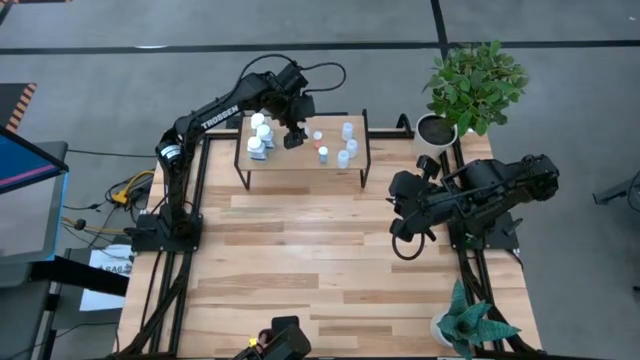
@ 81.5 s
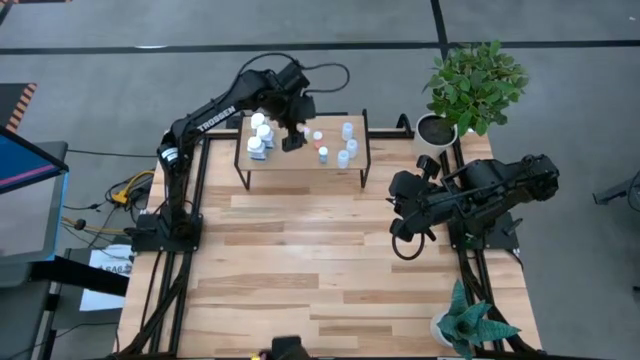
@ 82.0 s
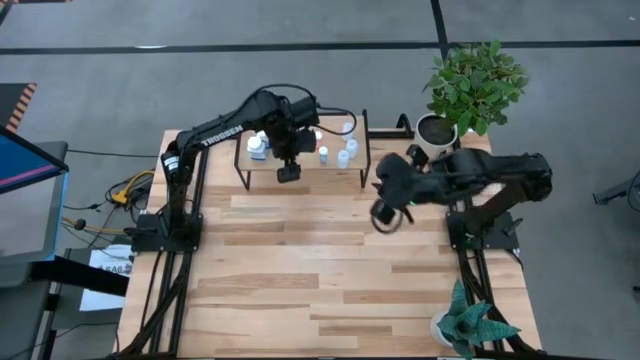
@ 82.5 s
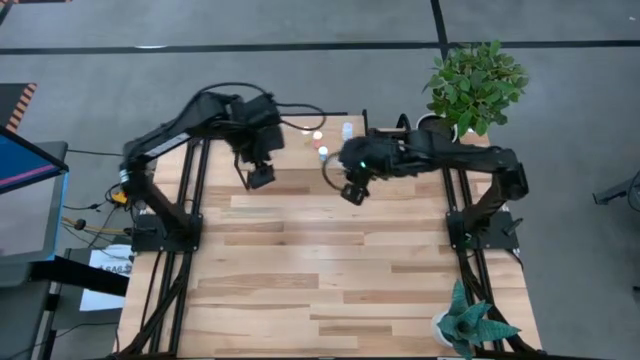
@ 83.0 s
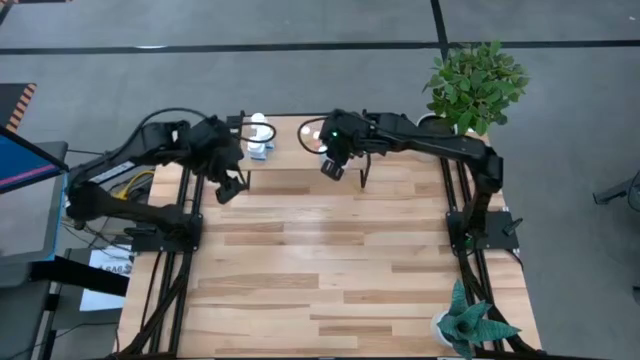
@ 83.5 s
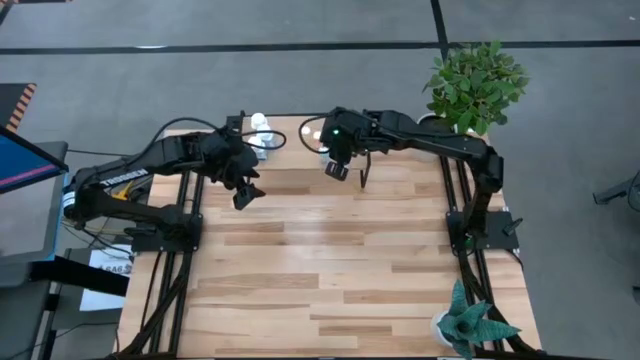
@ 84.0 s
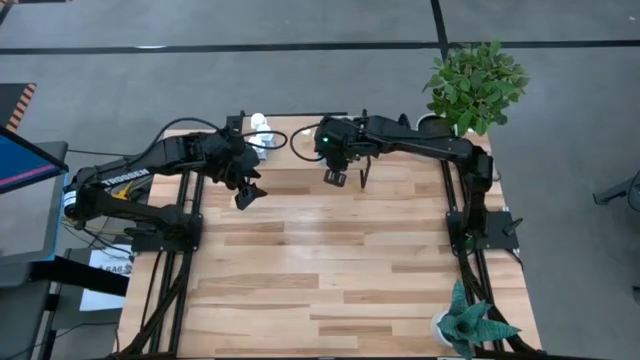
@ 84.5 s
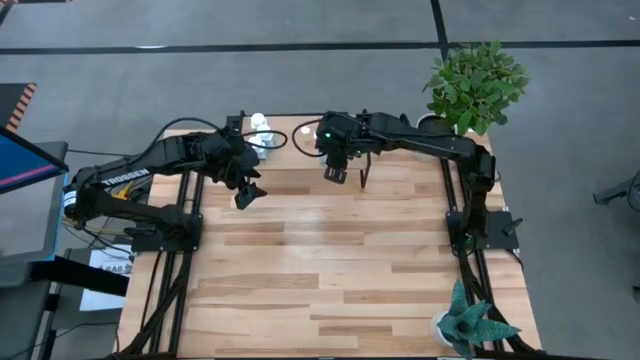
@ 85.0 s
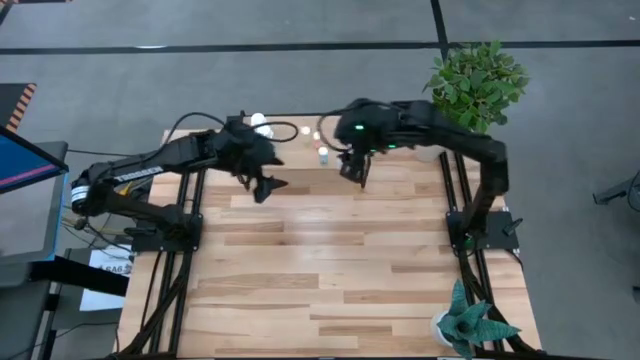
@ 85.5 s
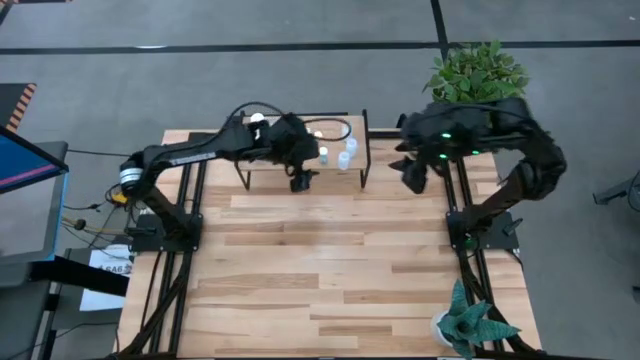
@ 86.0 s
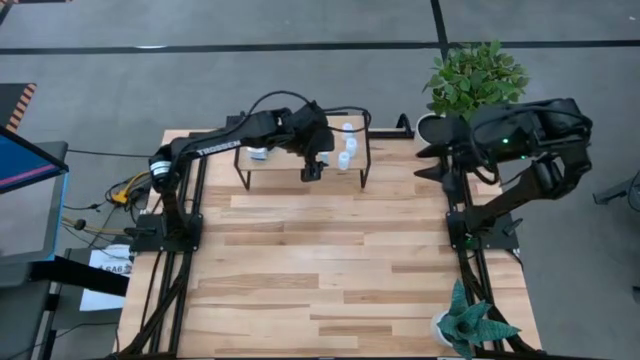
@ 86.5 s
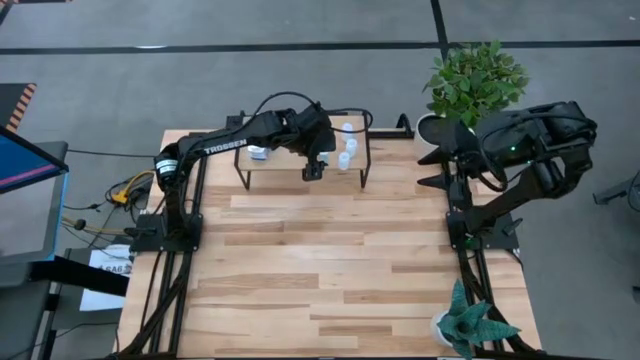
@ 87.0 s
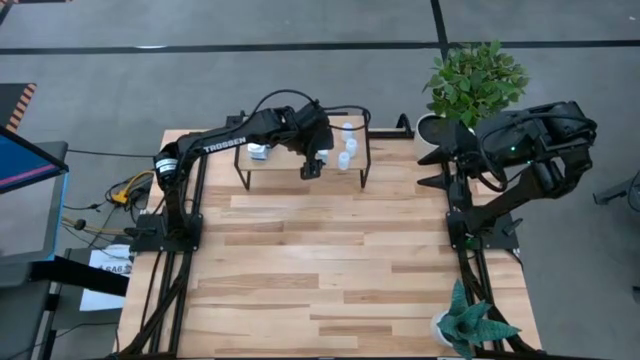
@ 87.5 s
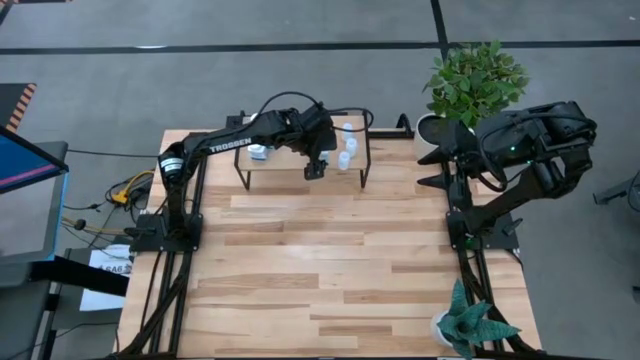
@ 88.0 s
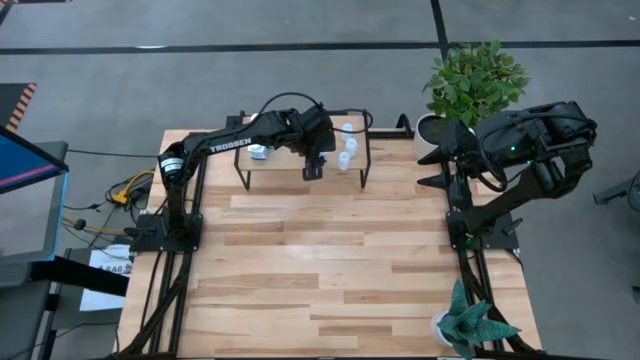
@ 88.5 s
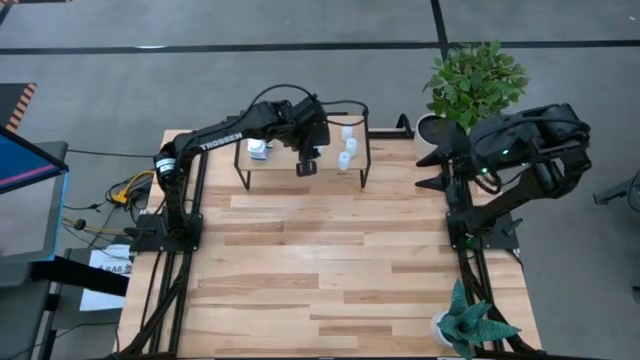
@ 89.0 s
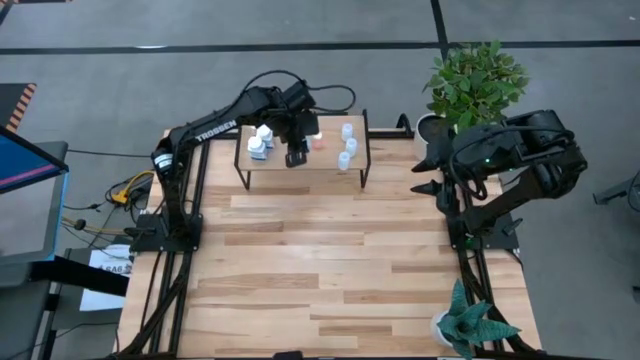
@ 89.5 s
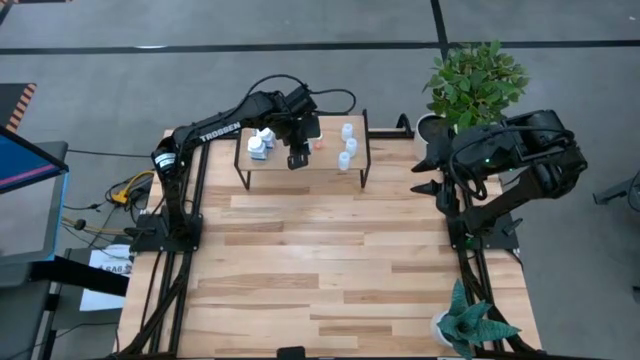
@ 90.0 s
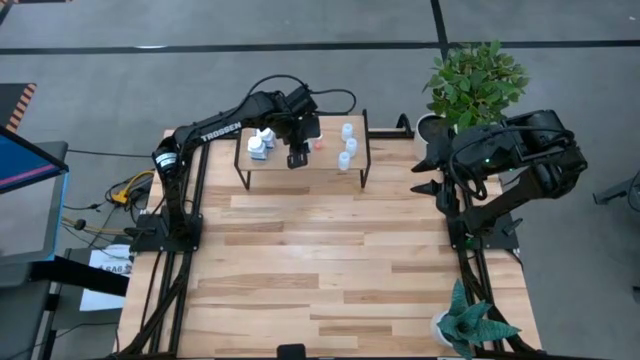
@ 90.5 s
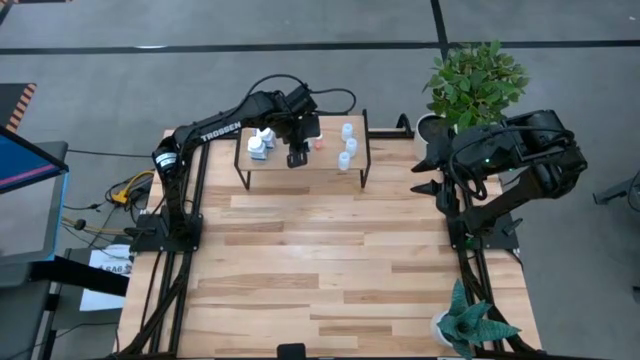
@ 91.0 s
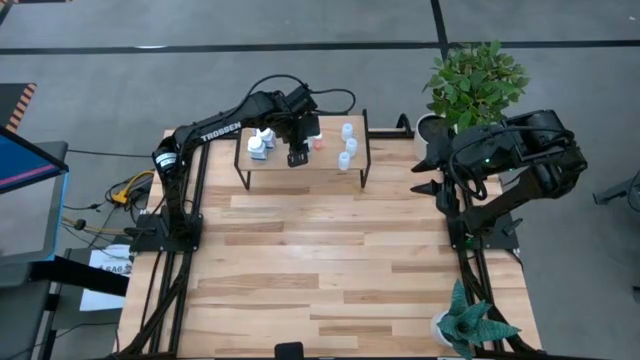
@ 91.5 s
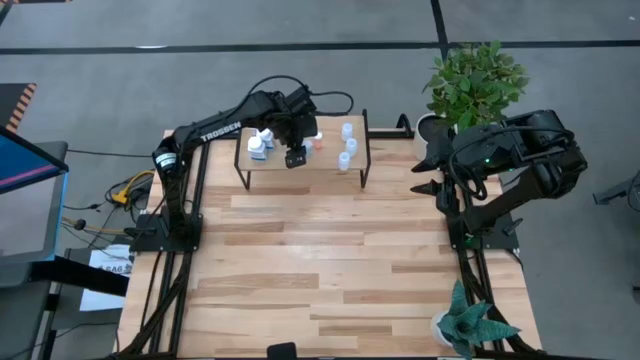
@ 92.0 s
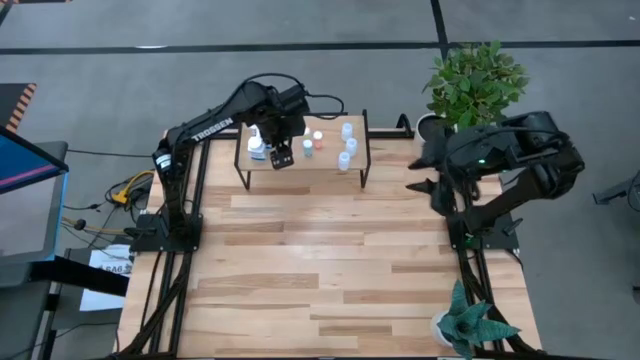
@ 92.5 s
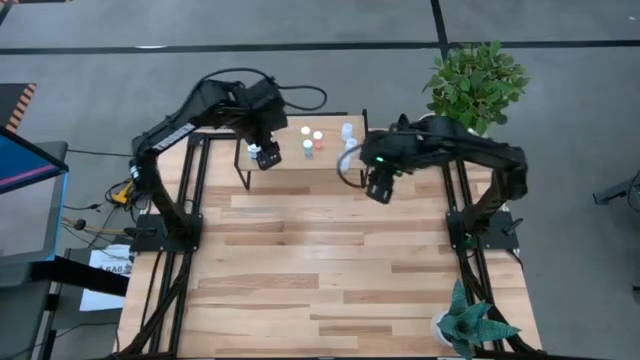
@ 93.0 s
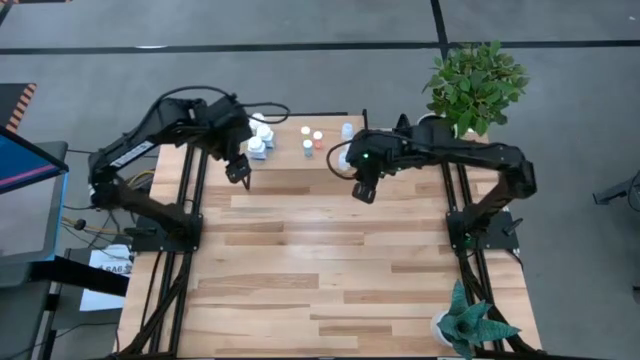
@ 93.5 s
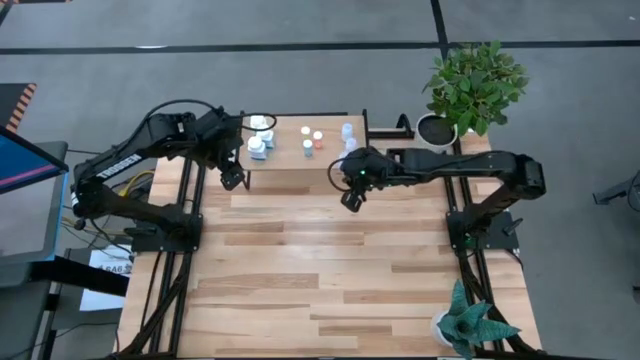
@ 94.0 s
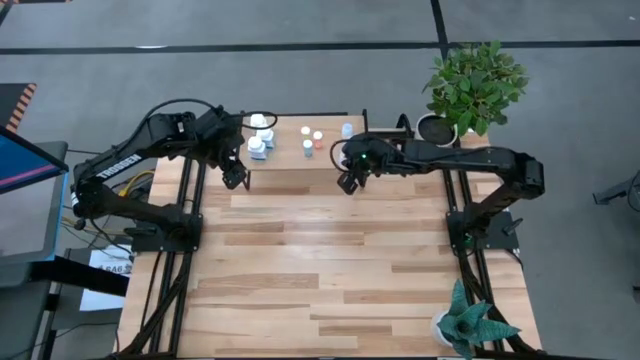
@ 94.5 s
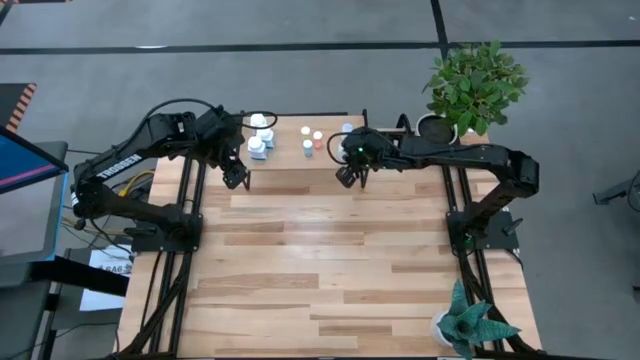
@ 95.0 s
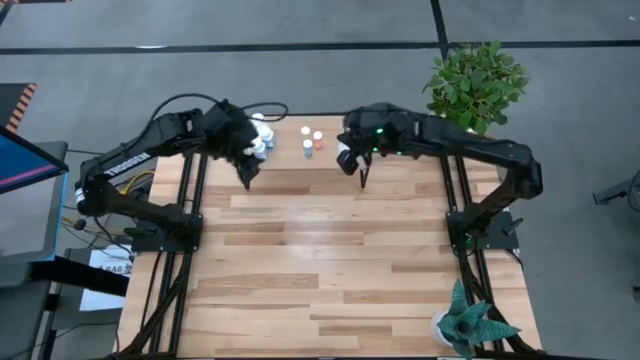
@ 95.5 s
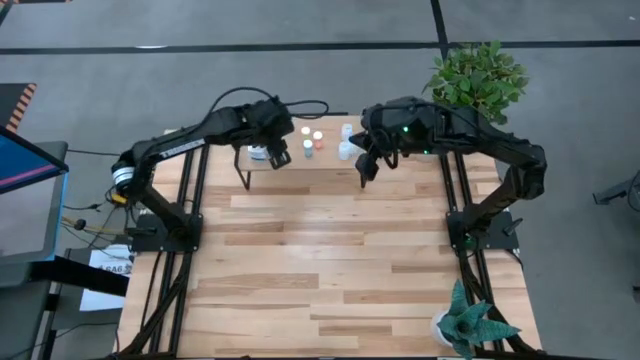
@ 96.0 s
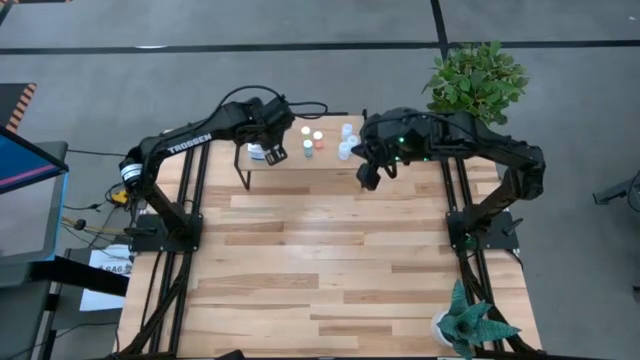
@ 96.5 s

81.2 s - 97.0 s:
Task: Pick and place medicine bottles onto shelf by color
Adjust the medicine bottles on the shelf

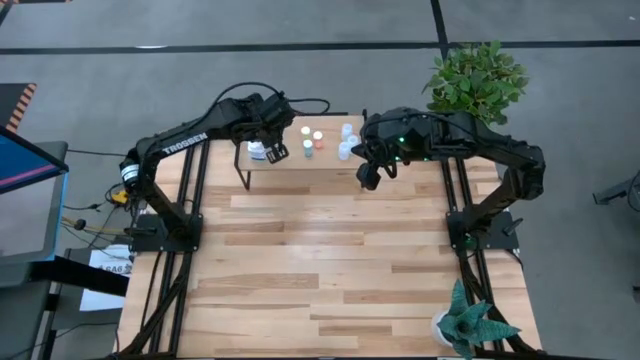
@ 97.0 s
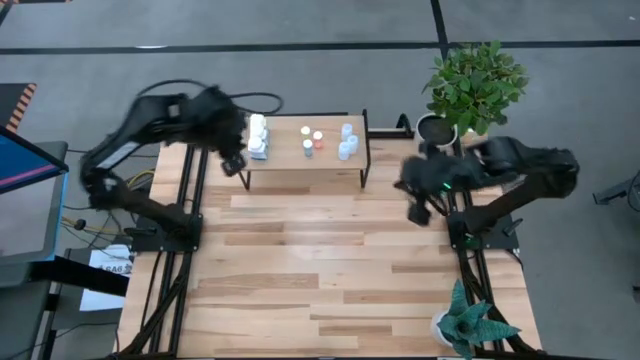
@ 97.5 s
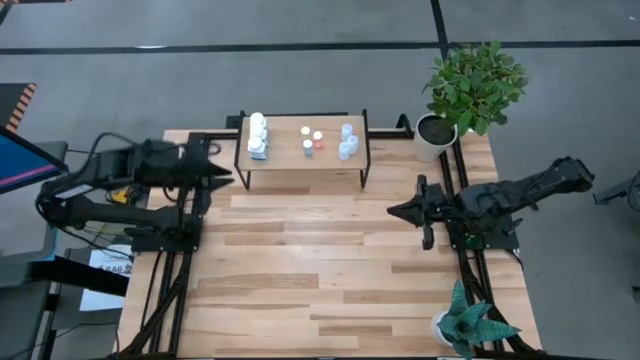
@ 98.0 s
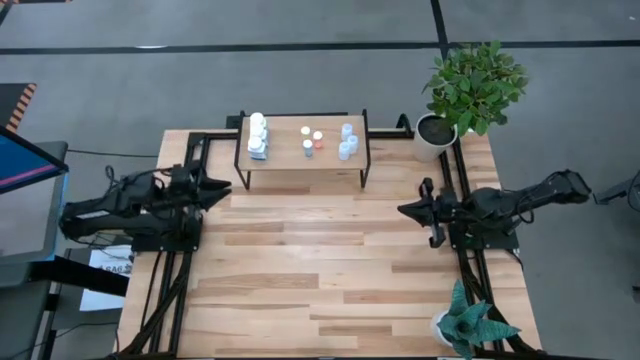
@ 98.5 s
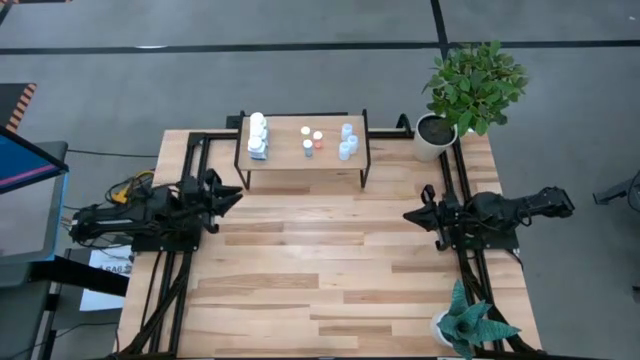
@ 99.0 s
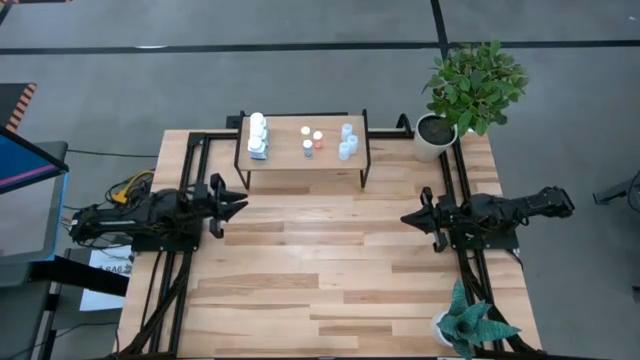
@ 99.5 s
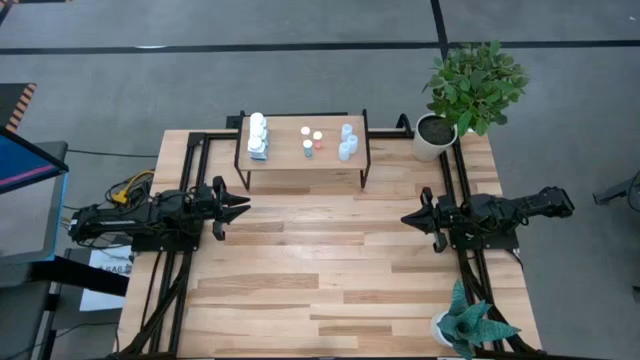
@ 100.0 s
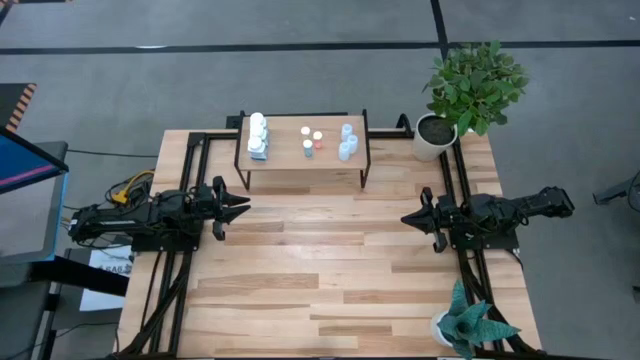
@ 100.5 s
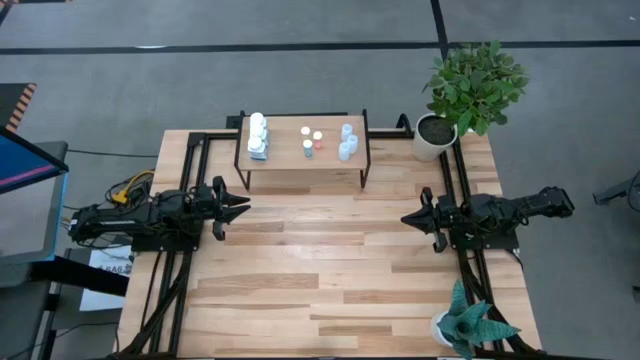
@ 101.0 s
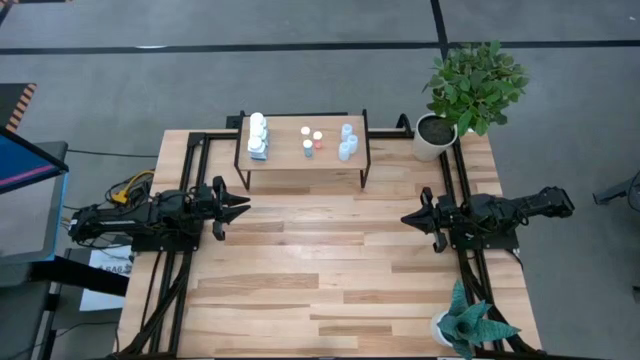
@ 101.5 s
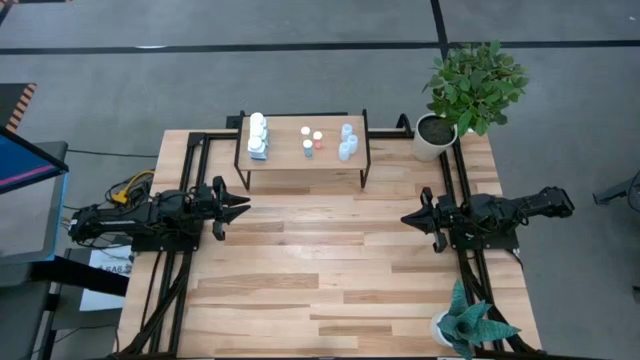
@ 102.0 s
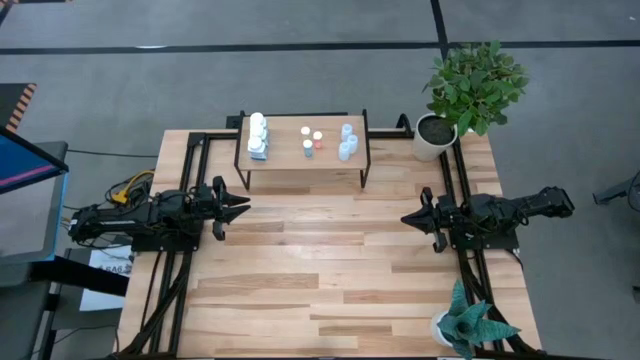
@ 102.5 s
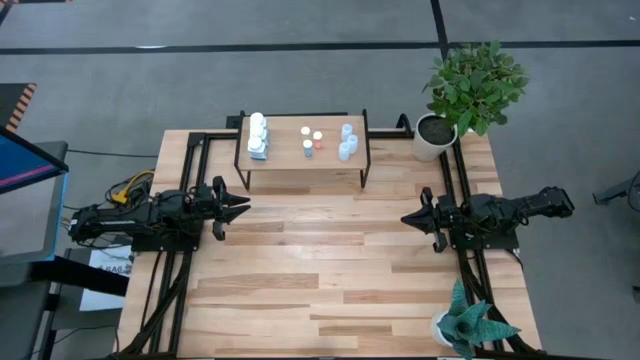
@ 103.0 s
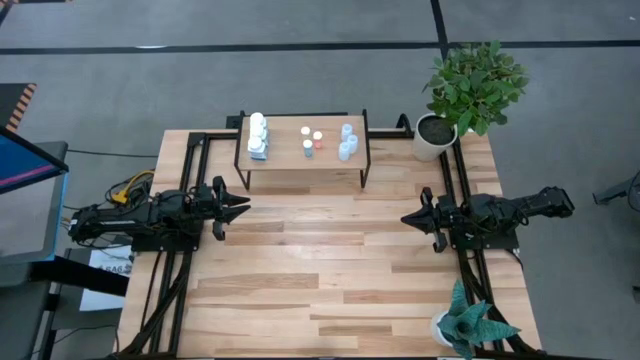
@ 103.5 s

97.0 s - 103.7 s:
Return to Home Position
